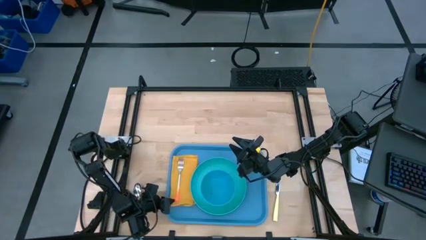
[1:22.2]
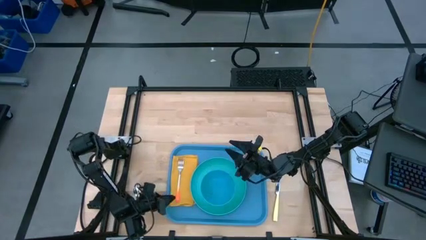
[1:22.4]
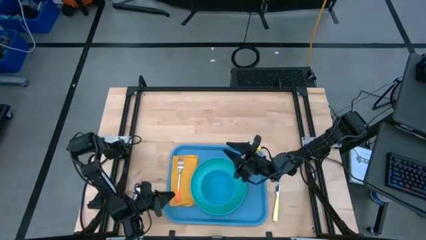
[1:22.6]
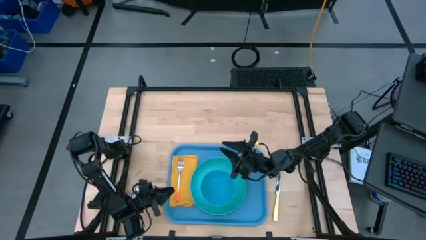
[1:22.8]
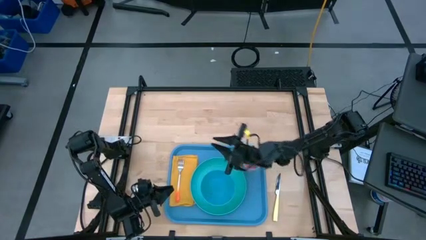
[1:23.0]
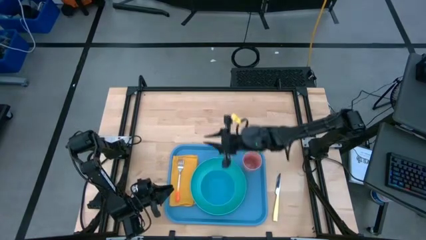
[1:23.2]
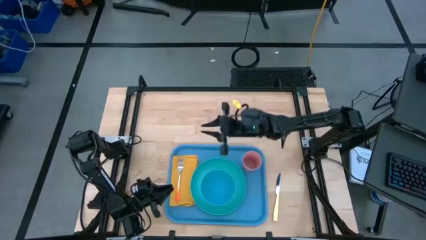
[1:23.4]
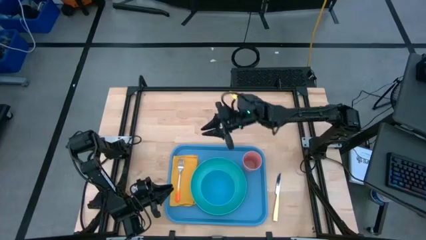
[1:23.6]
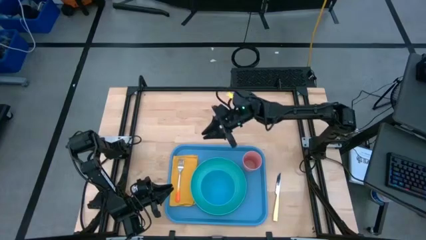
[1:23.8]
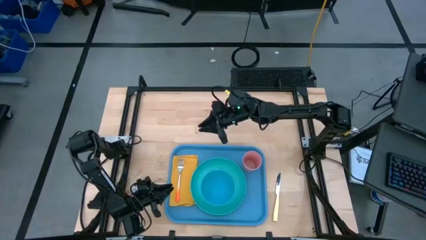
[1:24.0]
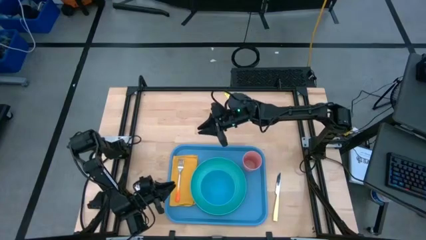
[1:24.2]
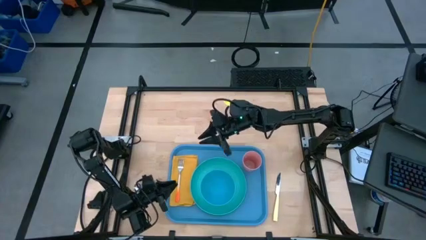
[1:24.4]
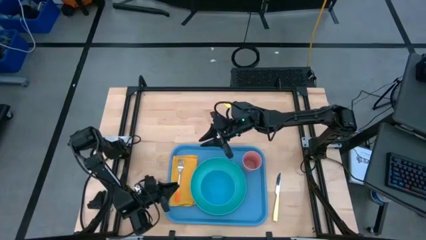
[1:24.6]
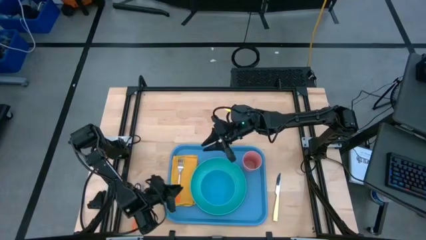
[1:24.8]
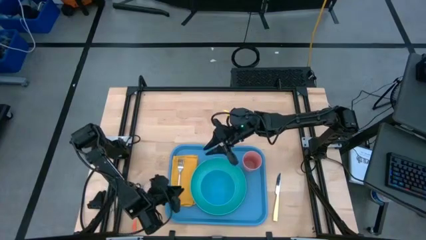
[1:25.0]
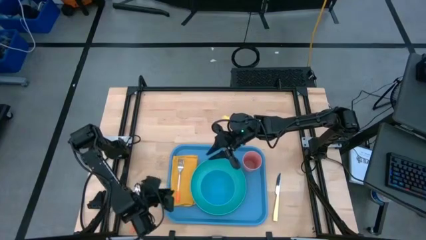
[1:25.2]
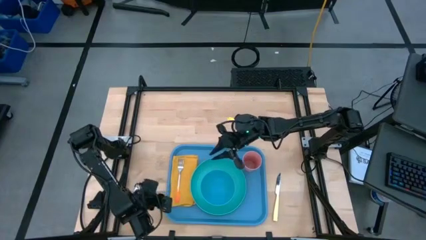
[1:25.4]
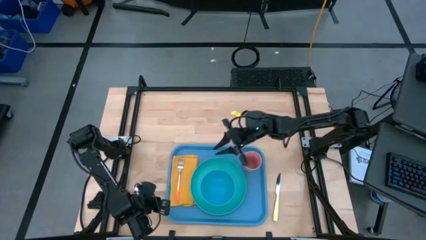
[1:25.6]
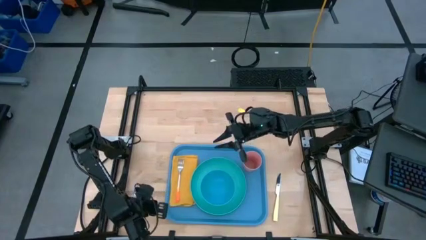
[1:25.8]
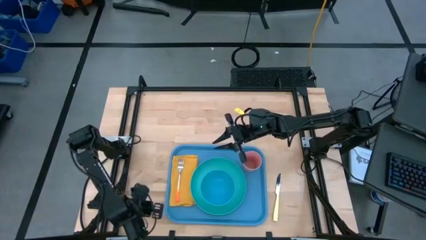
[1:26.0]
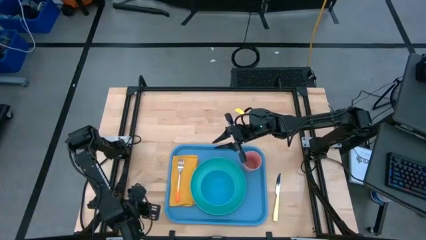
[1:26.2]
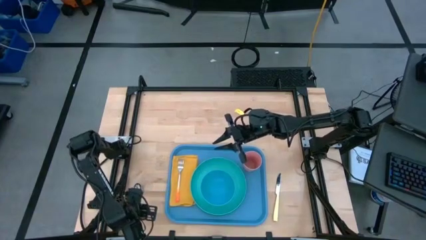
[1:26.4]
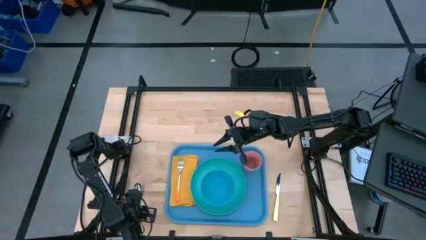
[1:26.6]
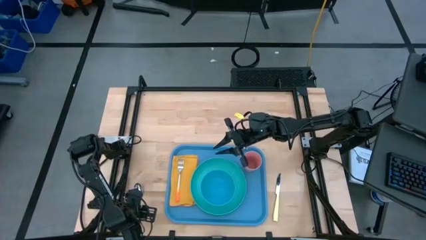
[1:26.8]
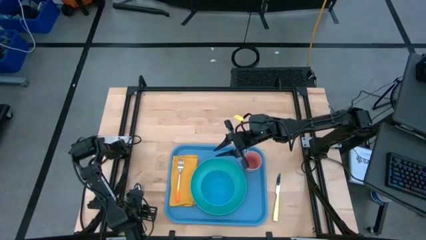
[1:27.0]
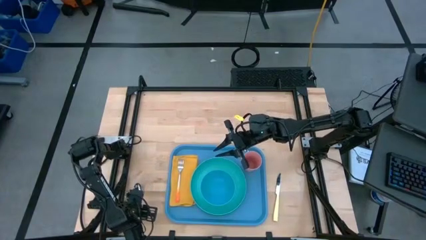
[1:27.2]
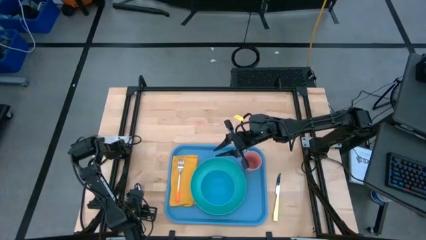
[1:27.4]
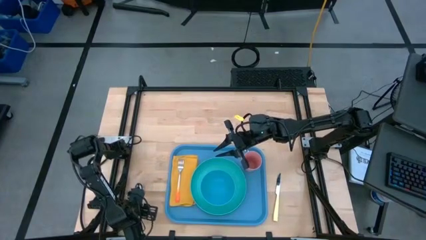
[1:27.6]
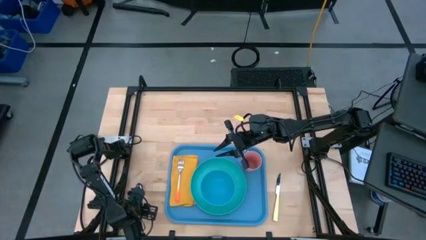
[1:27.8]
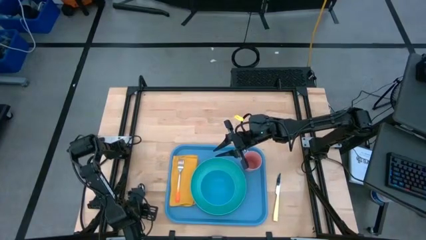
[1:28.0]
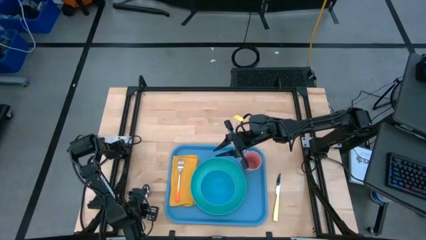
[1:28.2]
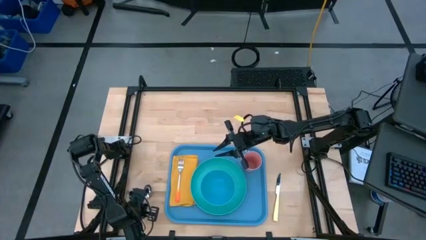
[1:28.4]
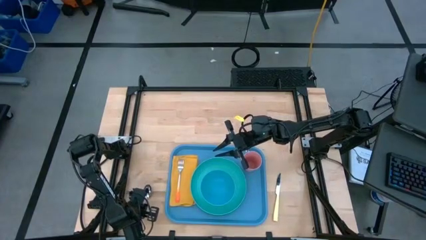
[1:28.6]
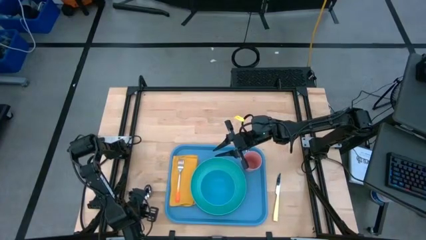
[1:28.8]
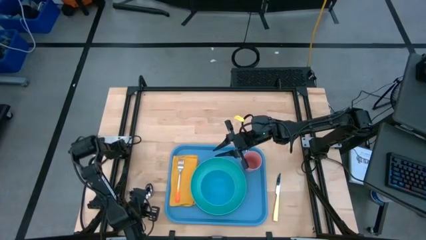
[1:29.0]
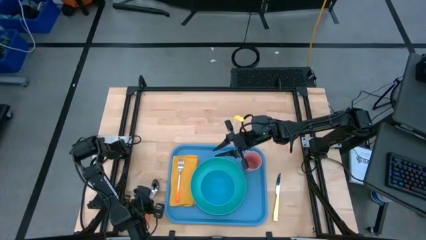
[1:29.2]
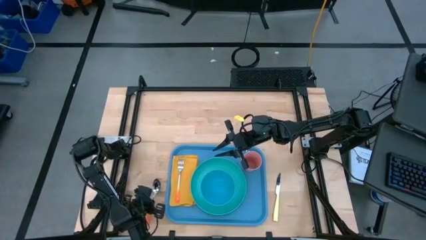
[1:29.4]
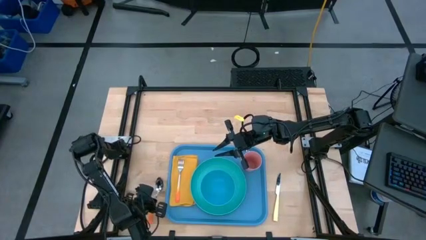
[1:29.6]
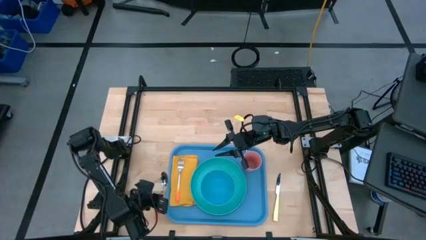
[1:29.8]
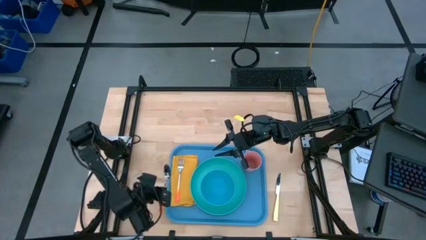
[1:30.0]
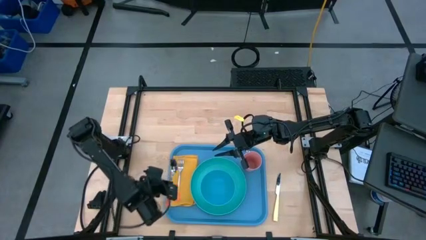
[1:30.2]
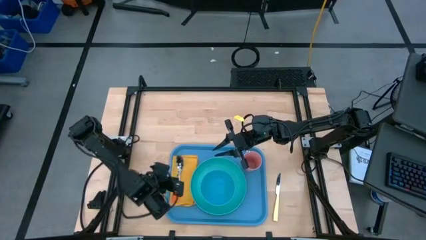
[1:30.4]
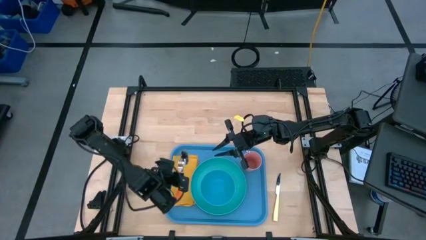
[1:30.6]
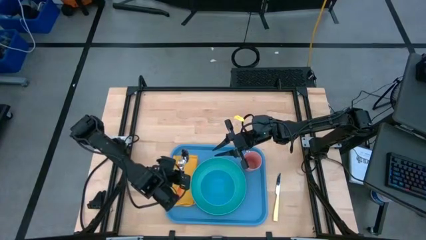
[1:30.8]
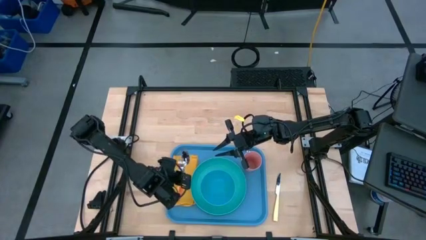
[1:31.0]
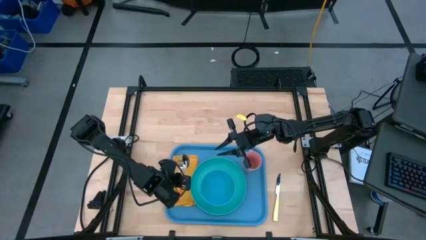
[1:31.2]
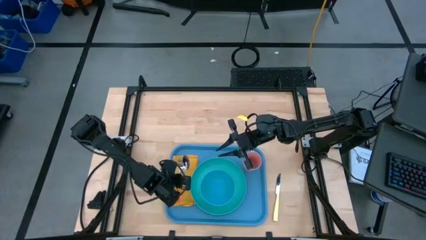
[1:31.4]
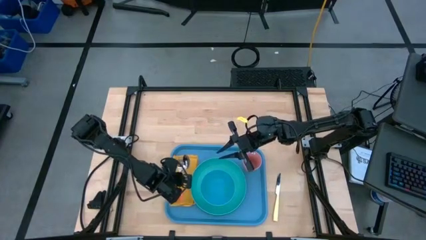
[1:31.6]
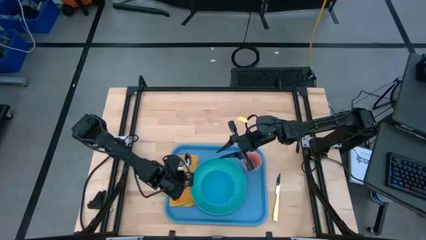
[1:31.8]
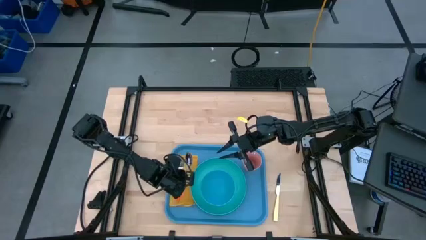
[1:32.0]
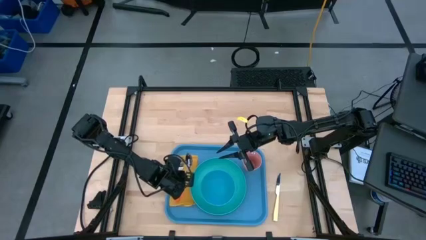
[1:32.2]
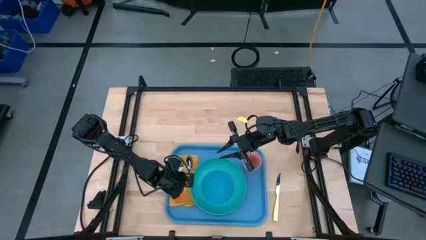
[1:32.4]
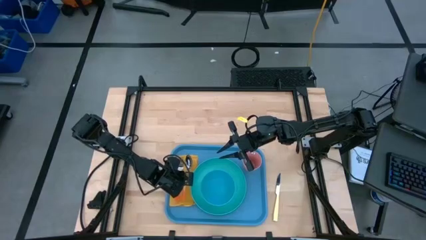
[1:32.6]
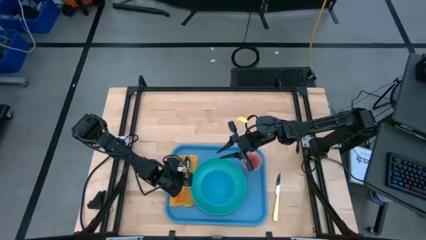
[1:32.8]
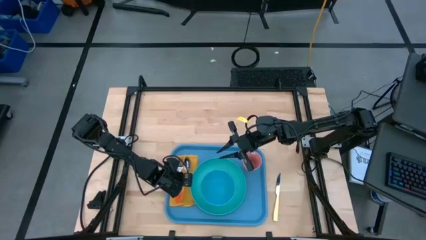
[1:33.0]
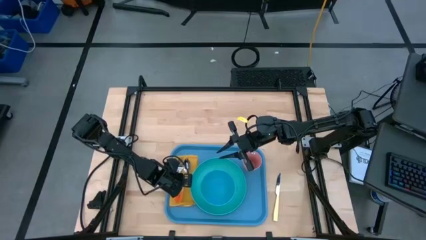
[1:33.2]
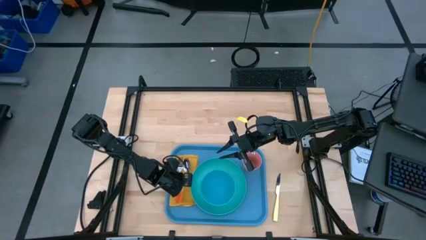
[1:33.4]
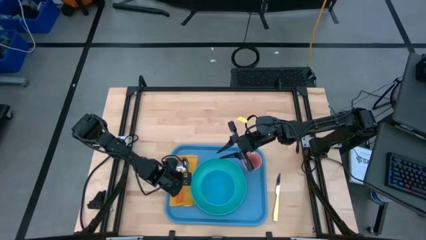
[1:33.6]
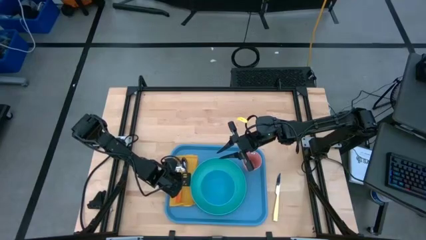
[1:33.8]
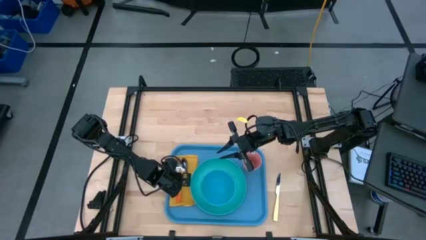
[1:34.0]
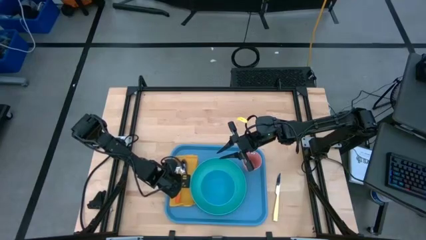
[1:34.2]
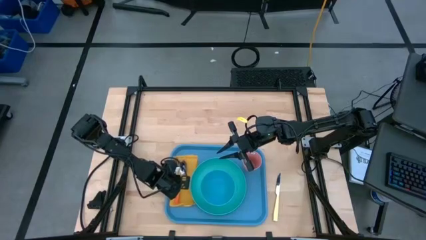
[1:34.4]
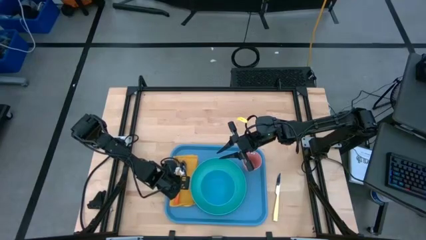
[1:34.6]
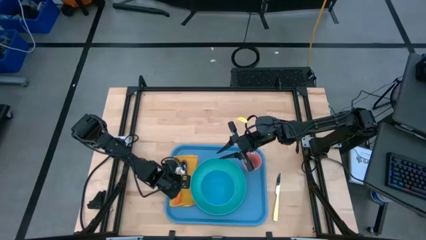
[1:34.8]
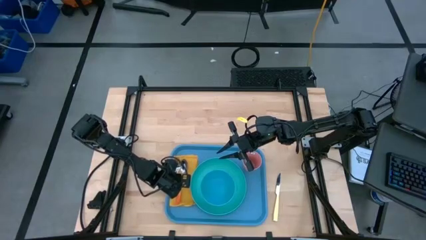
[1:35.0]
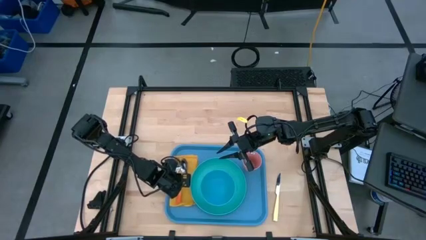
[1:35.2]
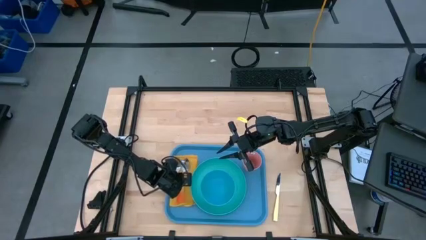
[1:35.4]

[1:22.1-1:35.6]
Task: Set up tray
Put the orange spoon on top of the yellow napkin to the right of the orange fork

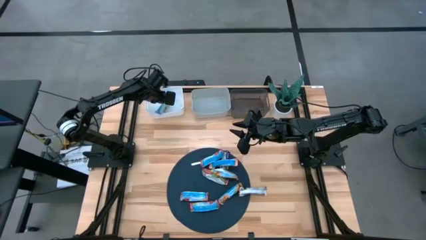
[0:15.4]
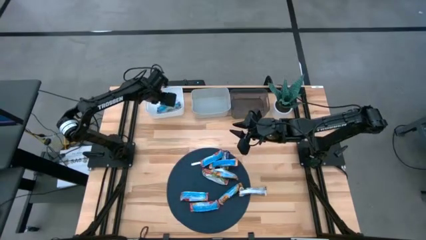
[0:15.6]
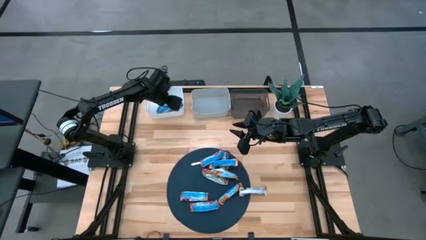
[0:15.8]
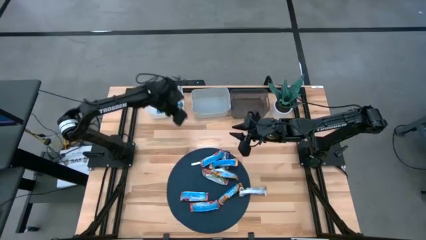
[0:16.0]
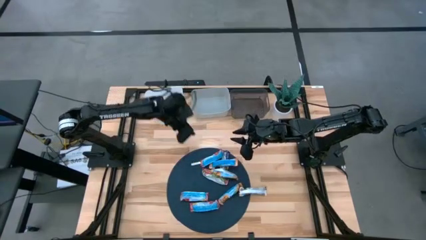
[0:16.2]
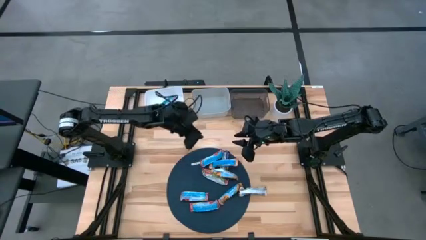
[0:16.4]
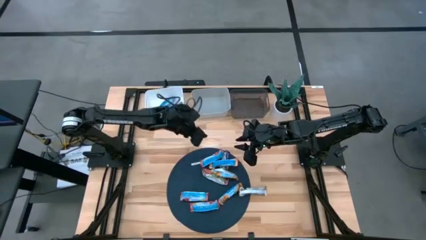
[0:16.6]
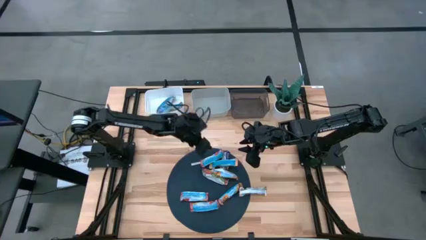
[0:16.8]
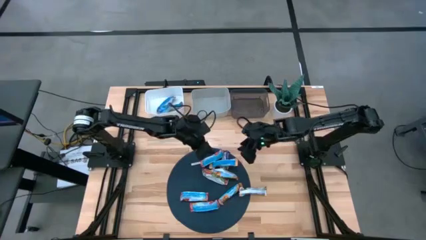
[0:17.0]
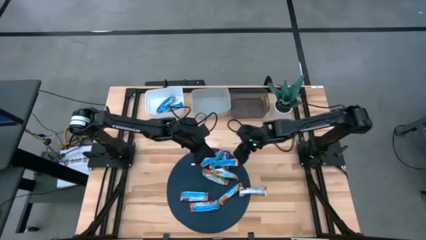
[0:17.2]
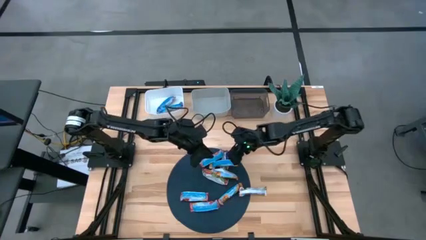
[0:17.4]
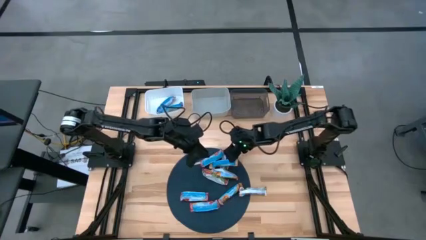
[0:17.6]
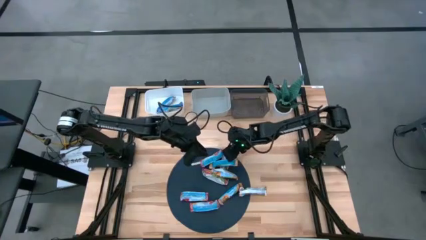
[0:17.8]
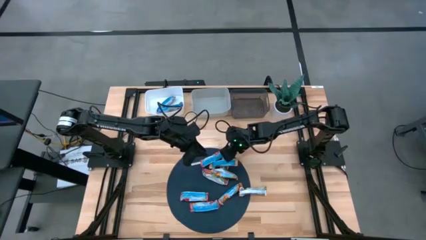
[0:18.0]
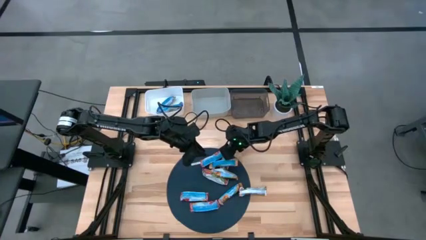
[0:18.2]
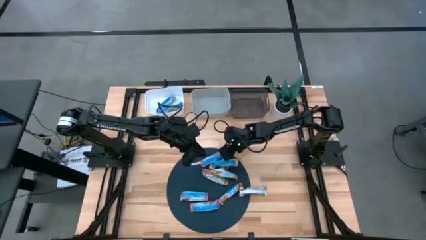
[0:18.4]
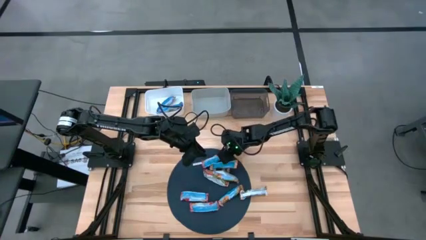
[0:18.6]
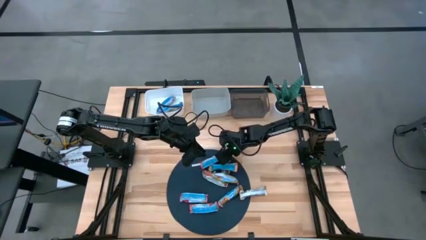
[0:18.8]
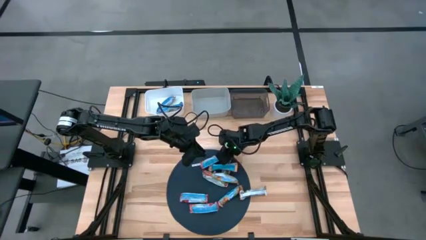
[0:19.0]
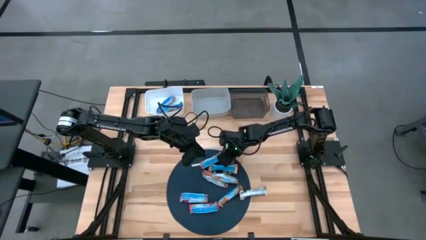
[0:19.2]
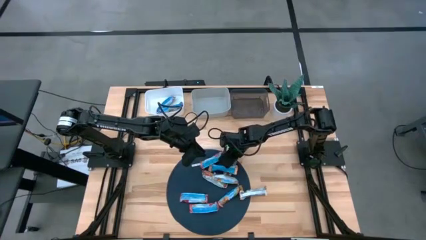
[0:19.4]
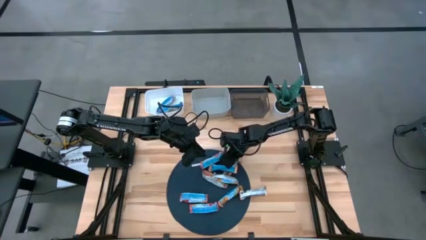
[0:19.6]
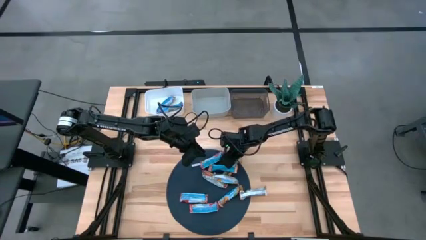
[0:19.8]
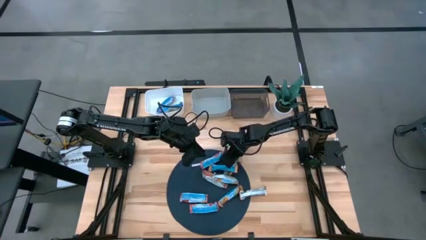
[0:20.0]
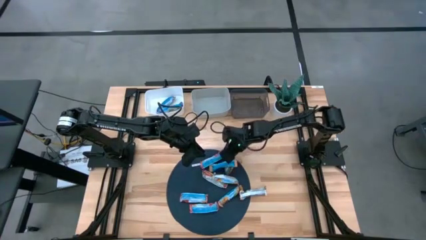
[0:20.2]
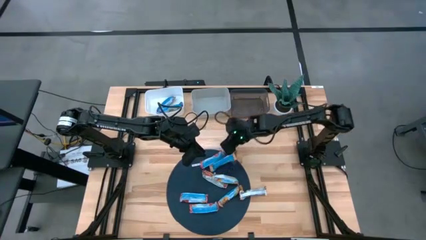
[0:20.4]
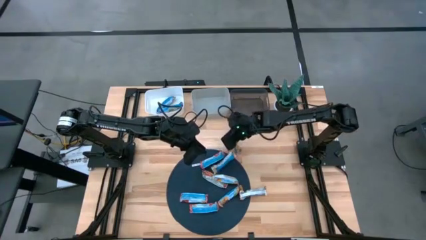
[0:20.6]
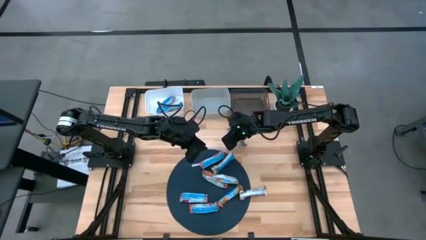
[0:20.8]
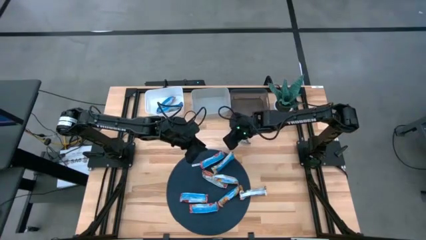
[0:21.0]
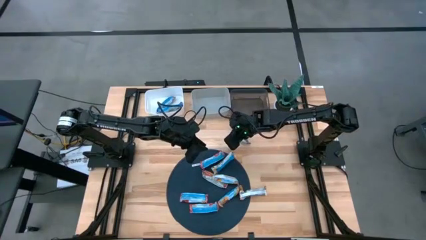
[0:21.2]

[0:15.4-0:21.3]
Task: Pick and place Granola Bars by type
Put the blue granola bar into the white bin
